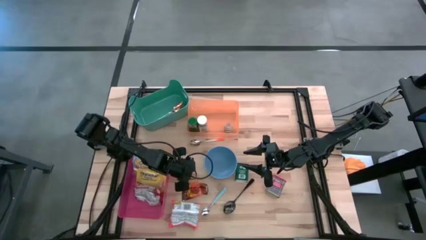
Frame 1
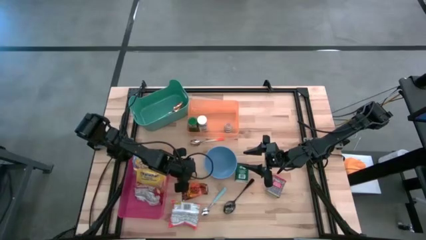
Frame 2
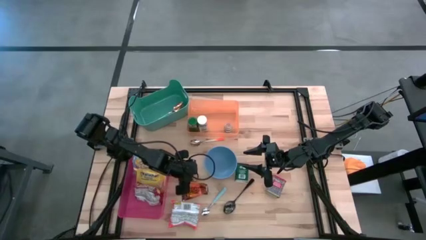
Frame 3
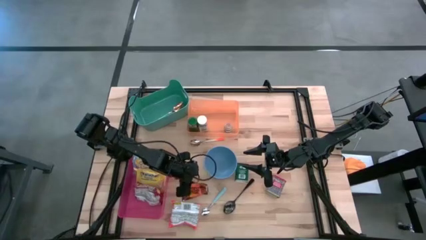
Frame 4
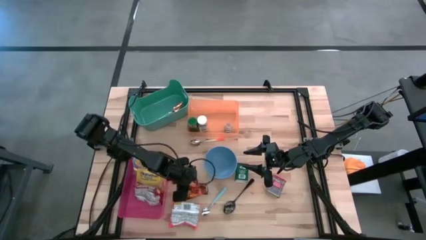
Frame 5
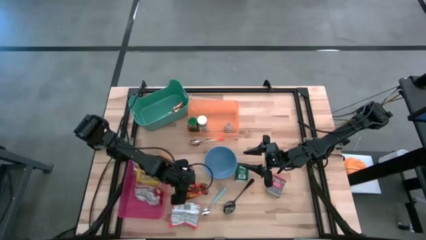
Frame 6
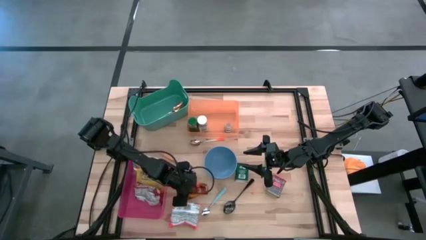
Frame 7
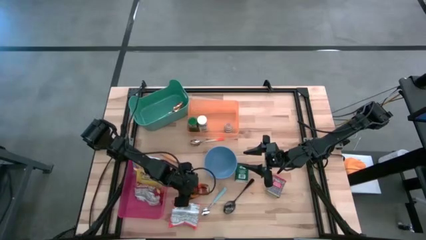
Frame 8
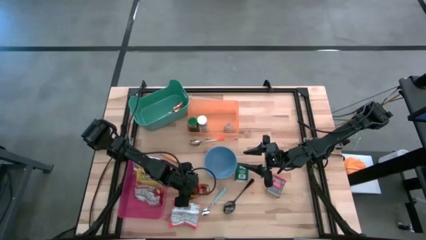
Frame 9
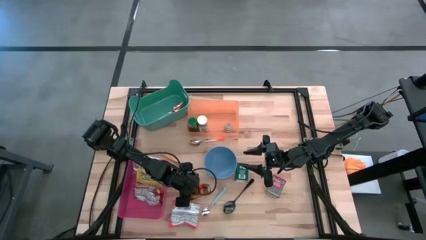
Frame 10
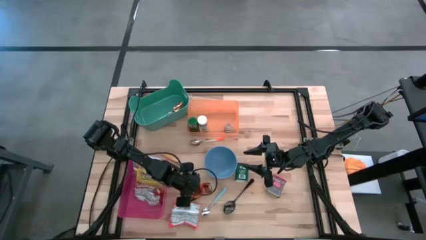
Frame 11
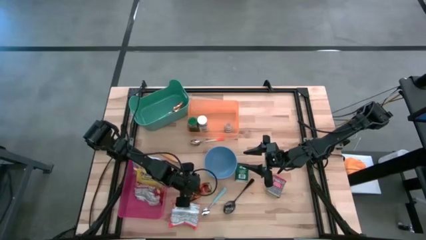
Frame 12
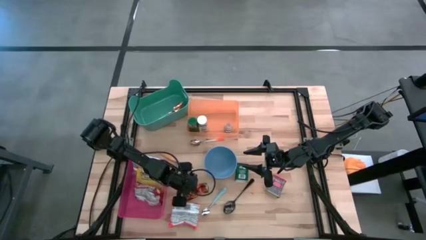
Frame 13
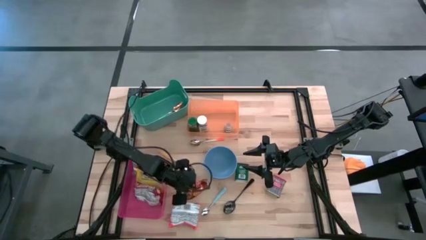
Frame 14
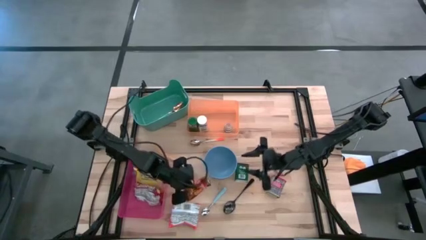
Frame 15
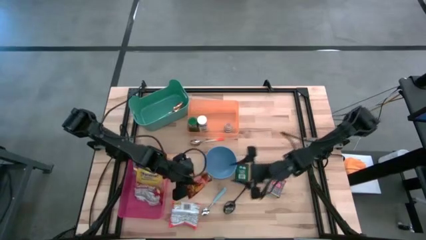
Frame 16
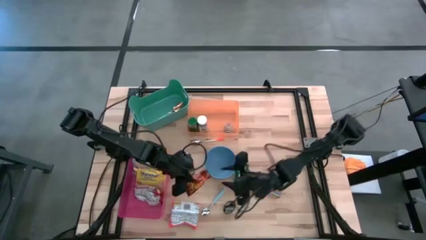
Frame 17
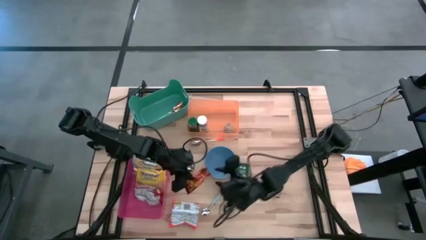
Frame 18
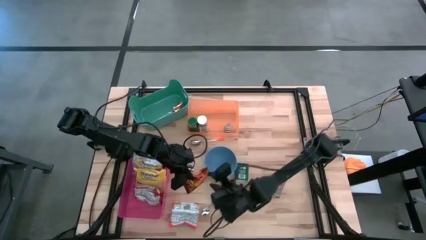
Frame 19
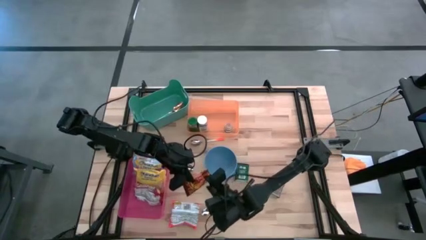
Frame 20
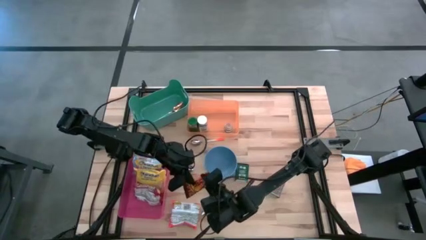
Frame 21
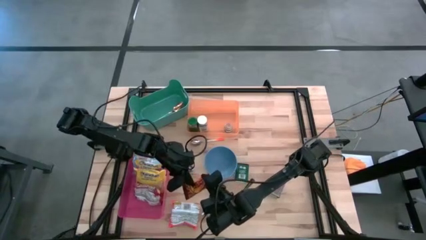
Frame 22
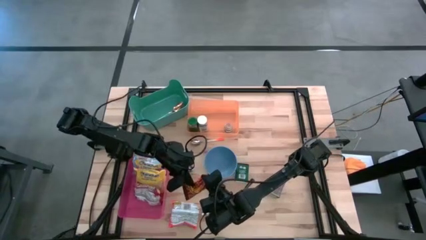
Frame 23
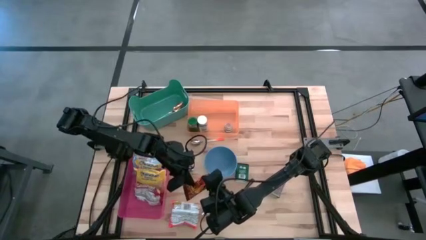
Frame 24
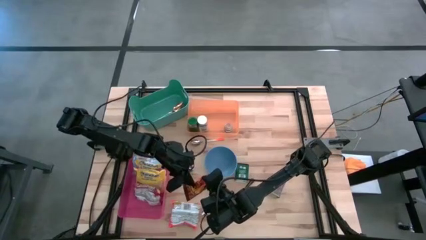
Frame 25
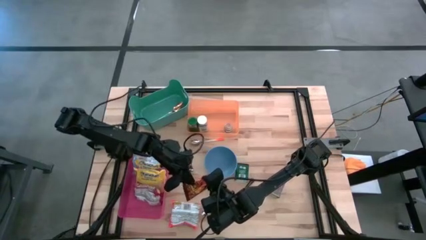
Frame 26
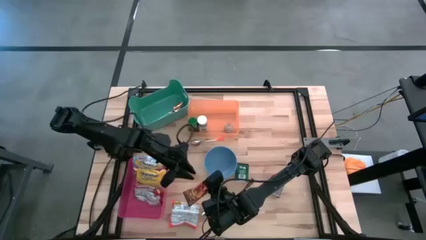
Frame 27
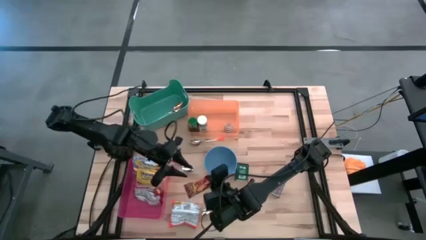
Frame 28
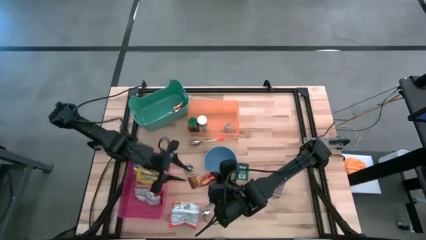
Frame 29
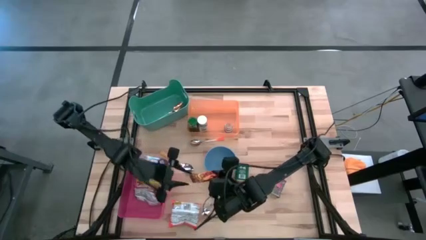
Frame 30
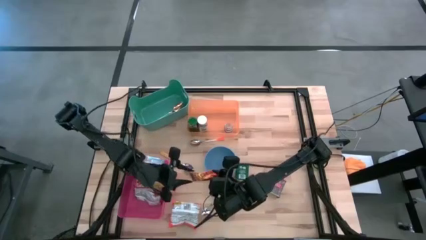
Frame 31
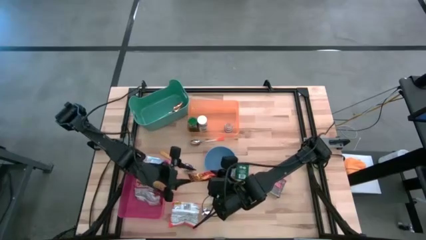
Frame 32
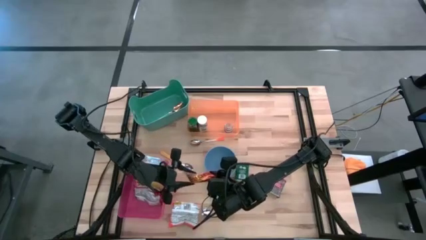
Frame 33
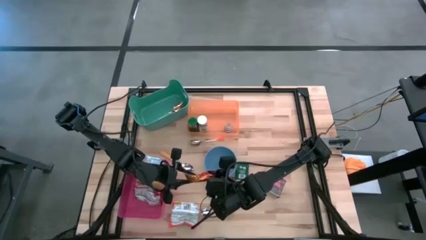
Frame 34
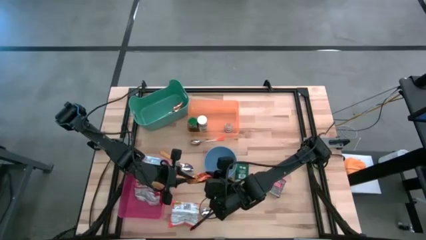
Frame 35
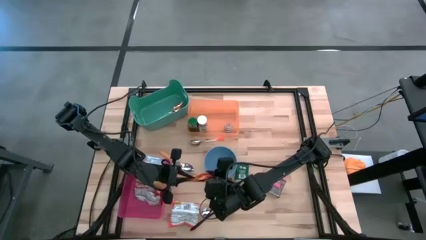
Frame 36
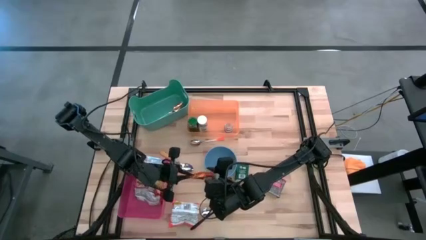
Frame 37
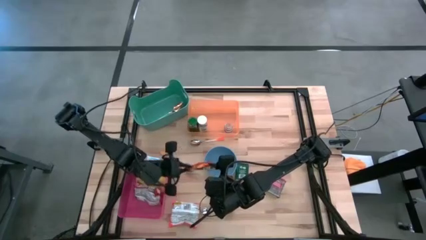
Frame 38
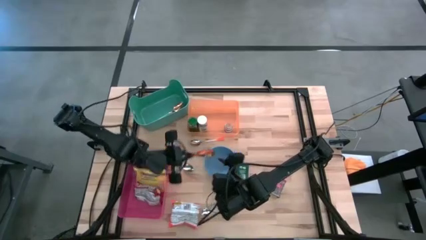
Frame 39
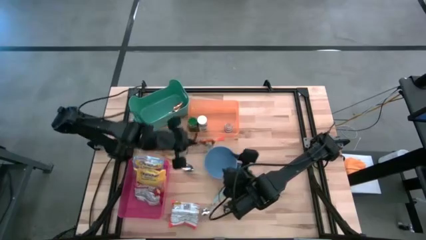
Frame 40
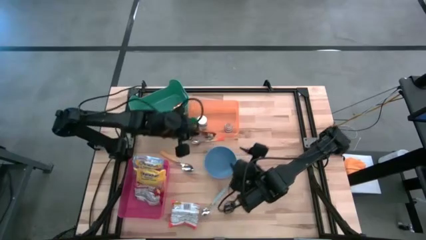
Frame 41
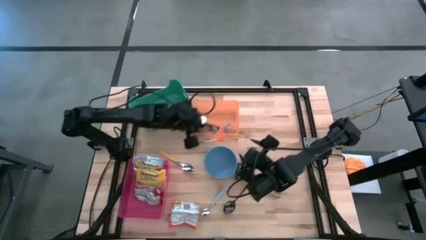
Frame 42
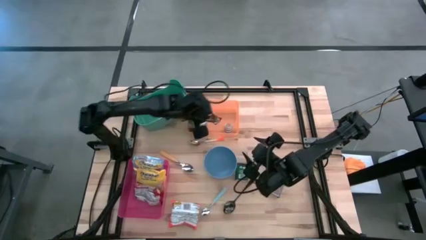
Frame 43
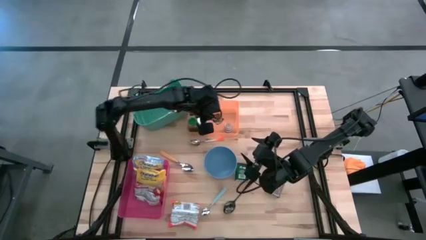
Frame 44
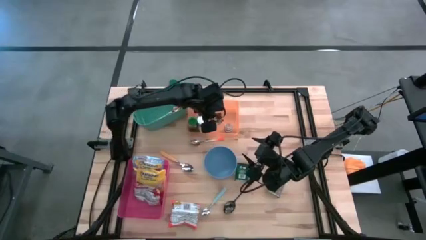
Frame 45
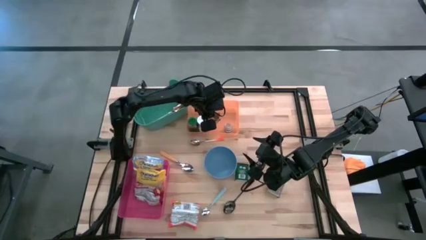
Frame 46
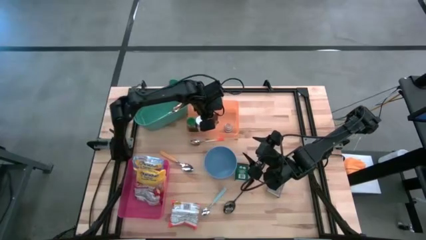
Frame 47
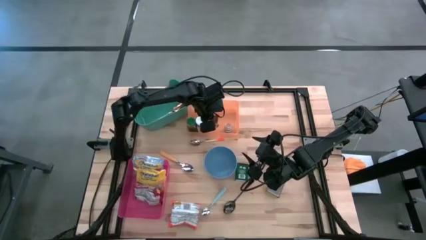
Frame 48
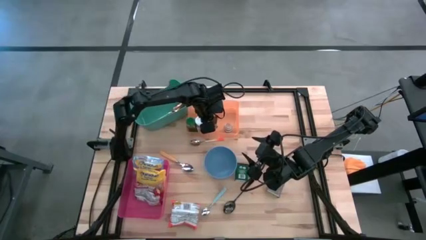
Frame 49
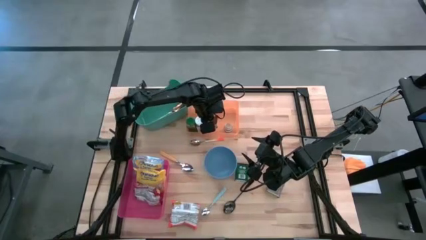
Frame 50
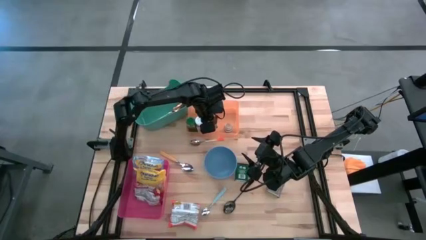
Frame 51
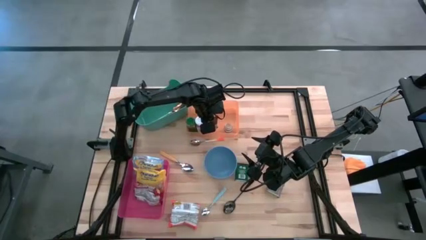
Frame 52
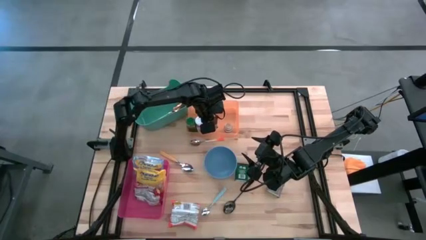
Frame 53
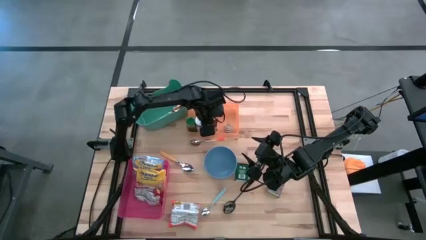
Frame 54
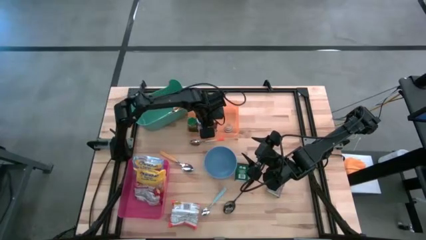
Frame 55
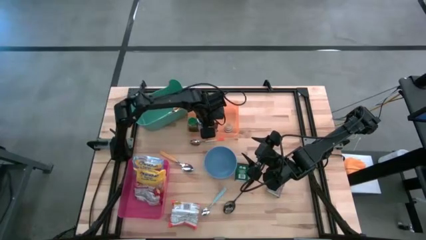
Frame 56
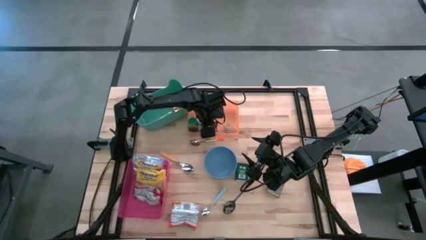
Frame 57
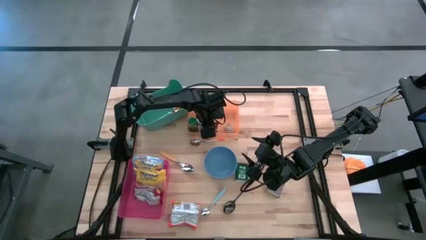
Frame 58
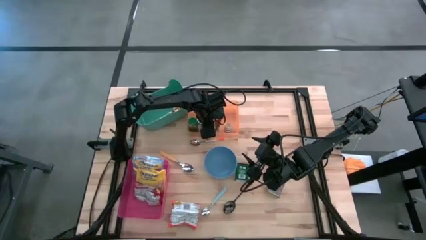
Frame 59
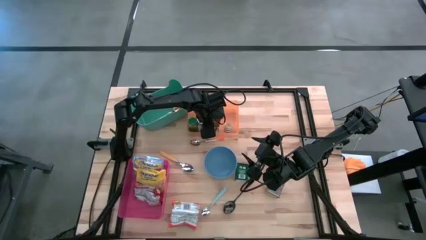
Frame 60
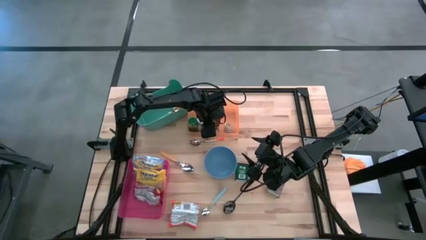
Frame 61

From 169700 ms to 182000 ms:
Put the orange spice pack into the orange bin
